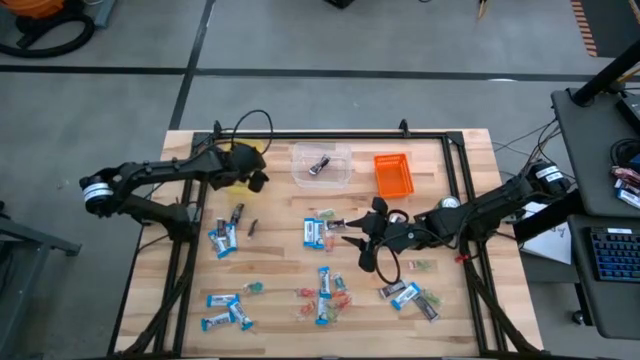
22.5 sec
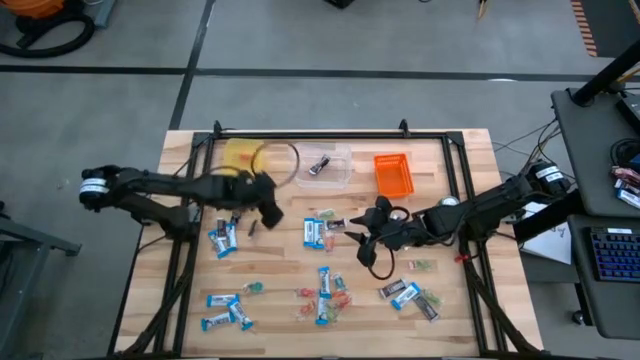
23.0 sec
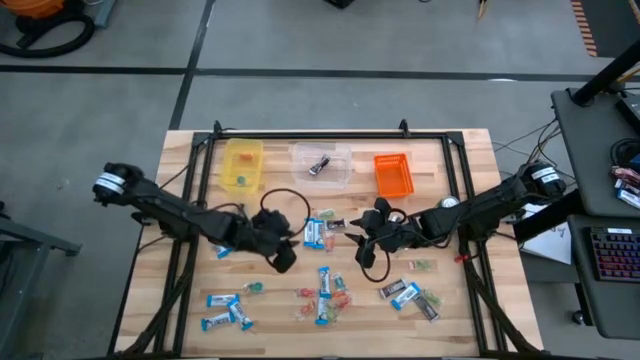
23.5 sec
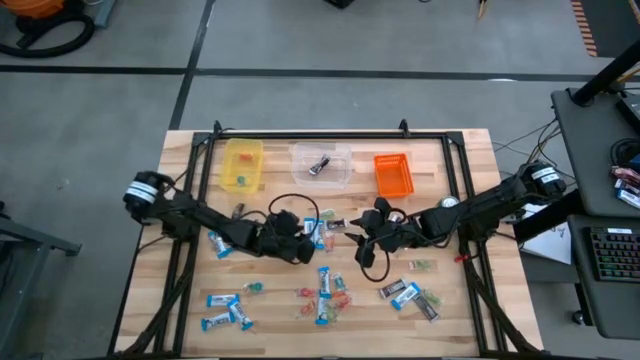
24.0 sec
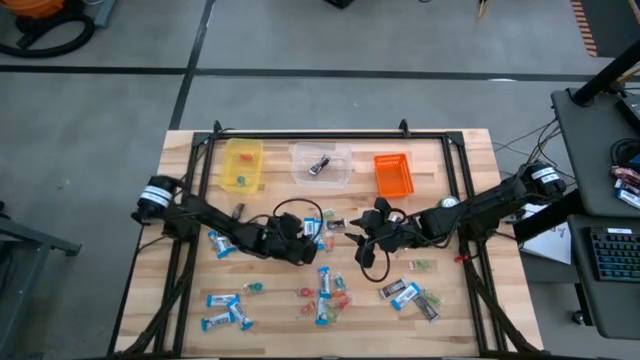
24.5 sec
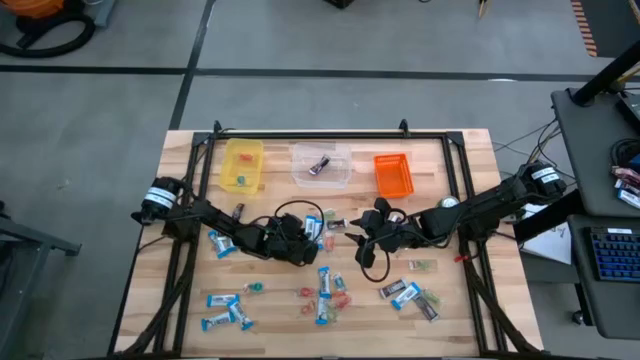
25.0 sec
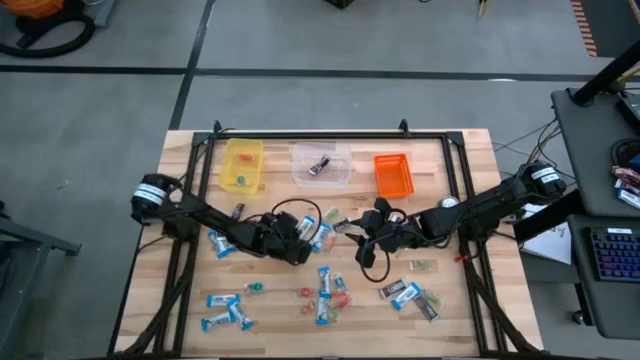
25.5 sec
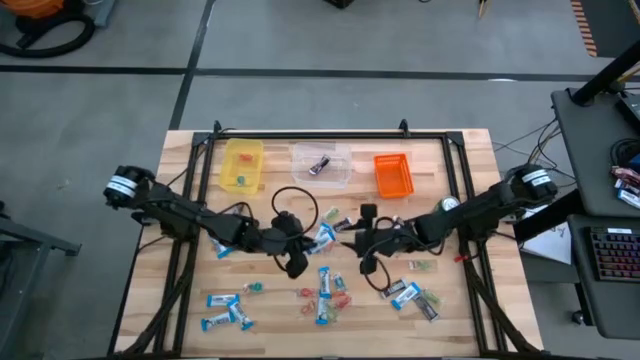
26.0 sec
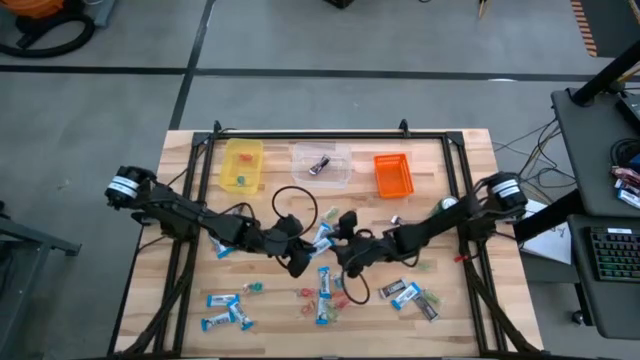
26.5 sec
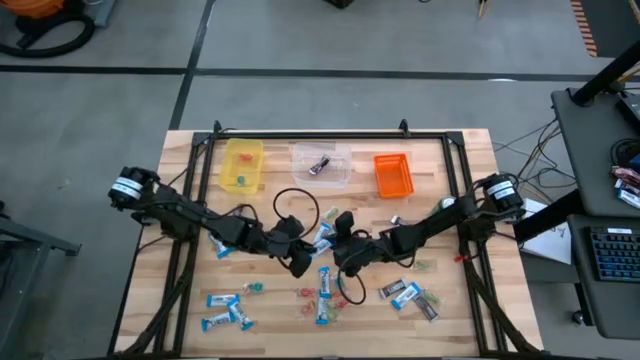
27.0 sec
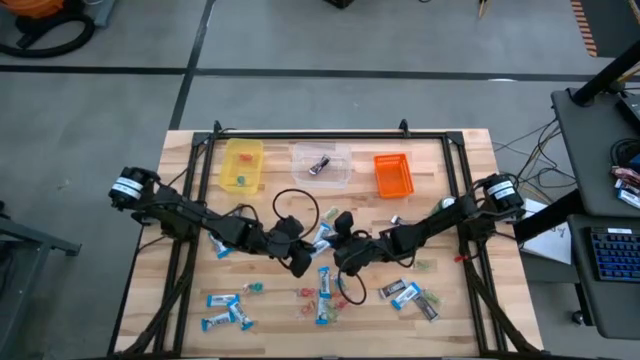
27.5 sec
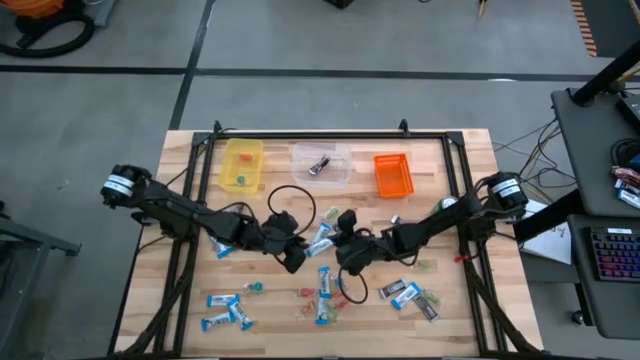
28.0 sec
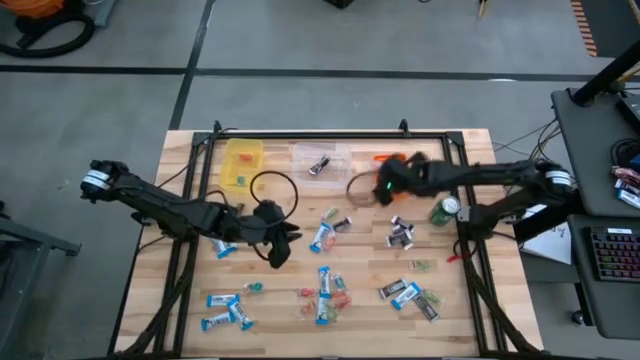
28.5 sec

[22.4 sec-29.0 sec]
Task: Organize candy in baskets
Put the white chocolate bar chocolate into the orange bin

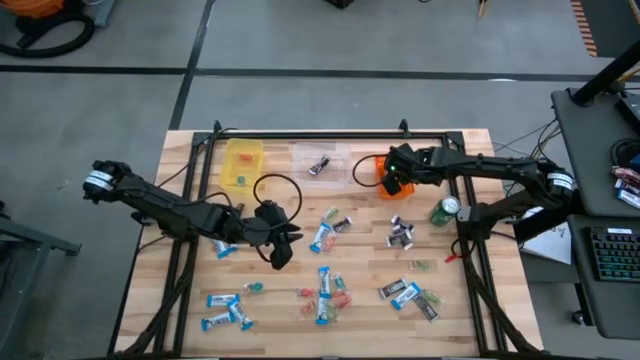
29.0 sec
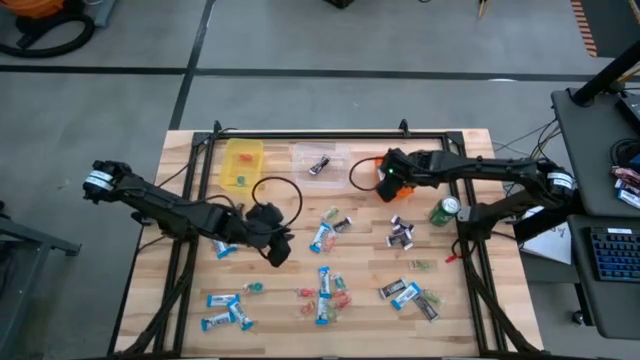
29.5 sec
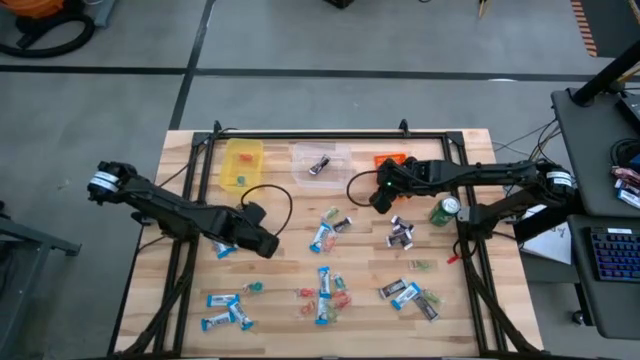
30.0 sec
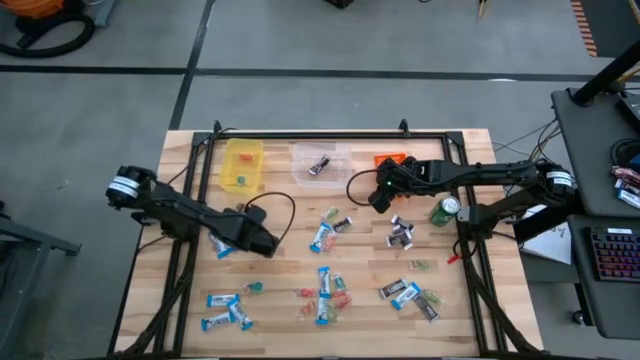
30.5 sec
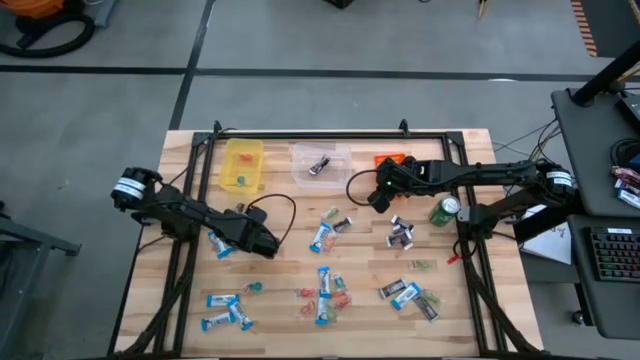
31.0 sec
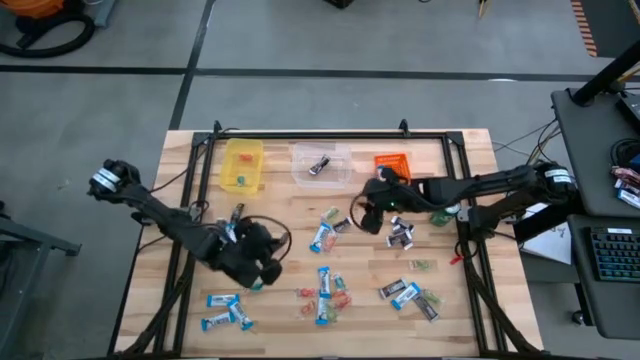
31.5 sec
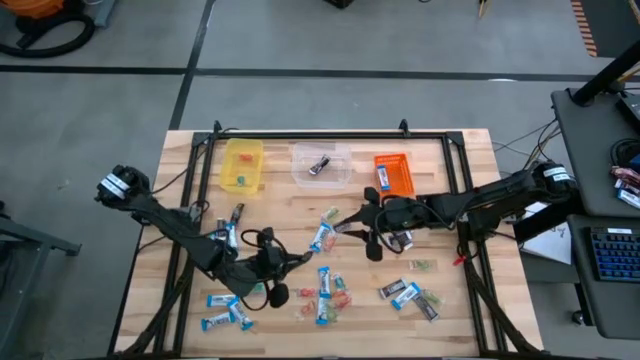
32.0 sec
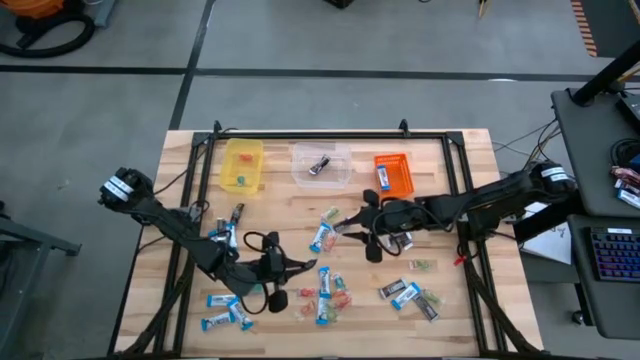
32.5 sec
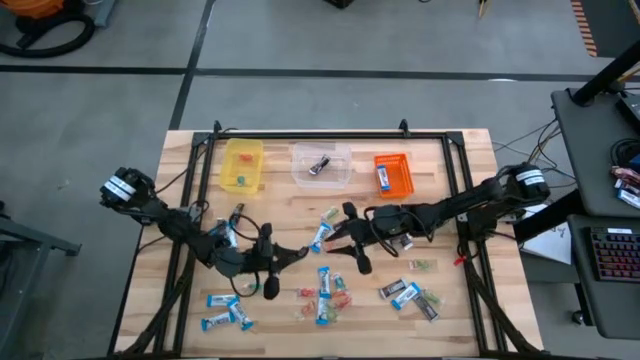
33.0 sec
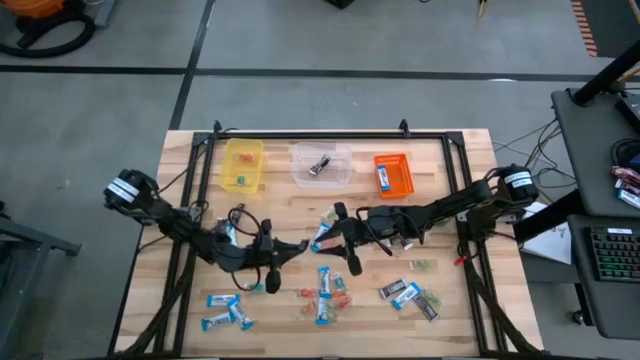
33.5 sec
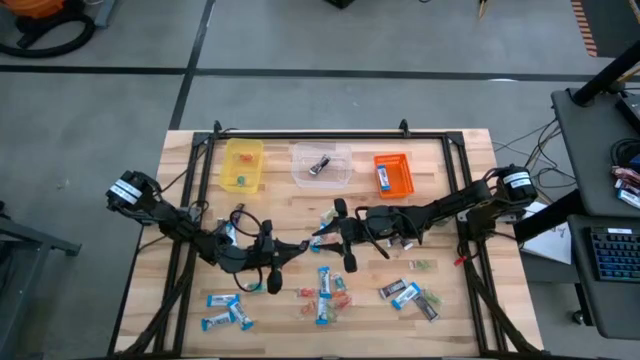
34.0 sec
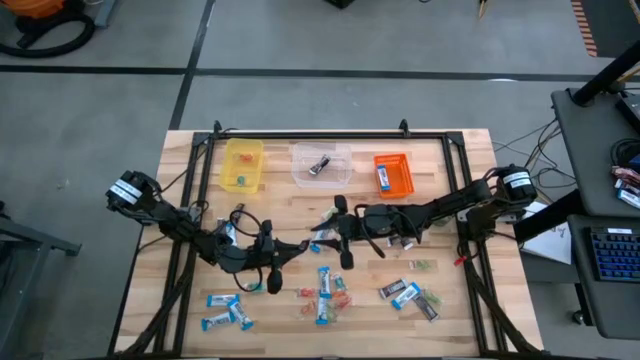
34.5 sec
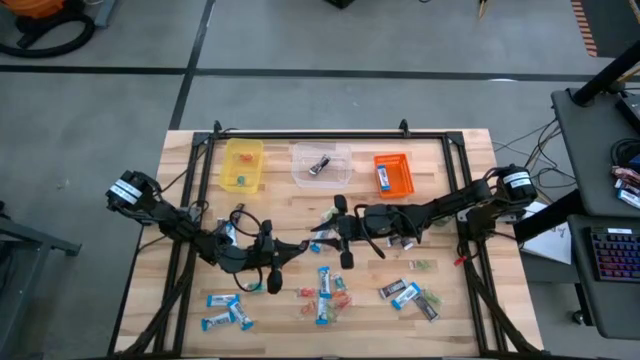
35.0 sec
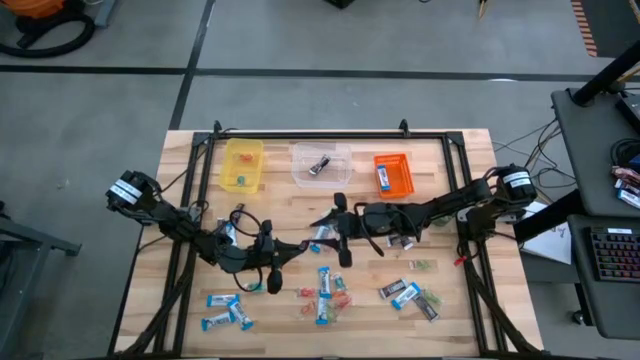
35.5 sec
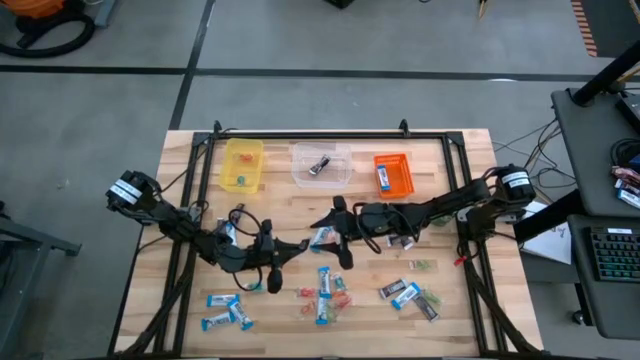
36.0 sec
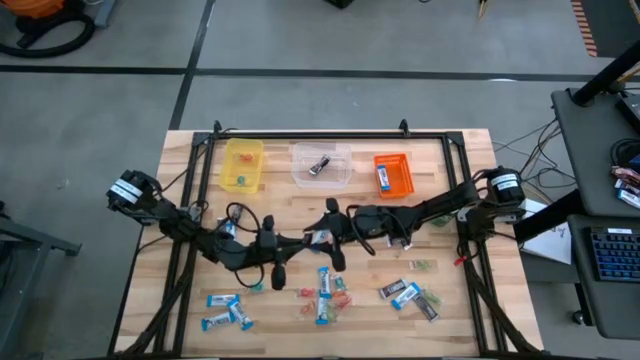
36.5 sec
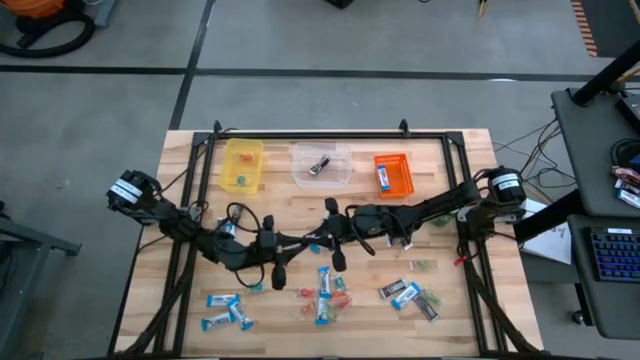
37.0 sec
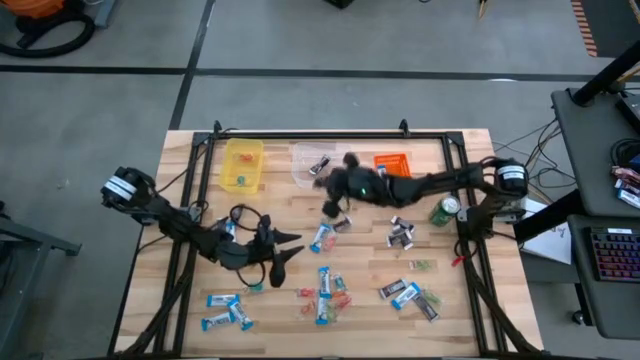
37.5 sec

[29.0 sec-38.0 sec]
Put the brown chocolate bar into the transparent bin

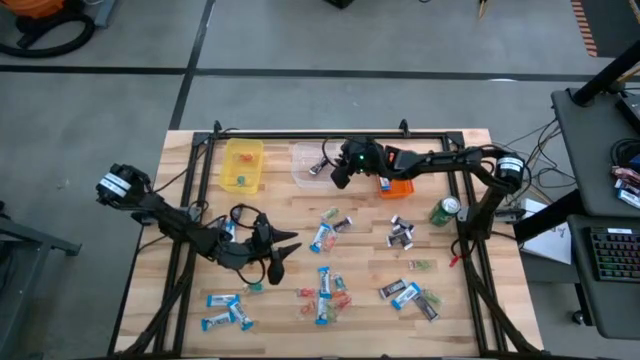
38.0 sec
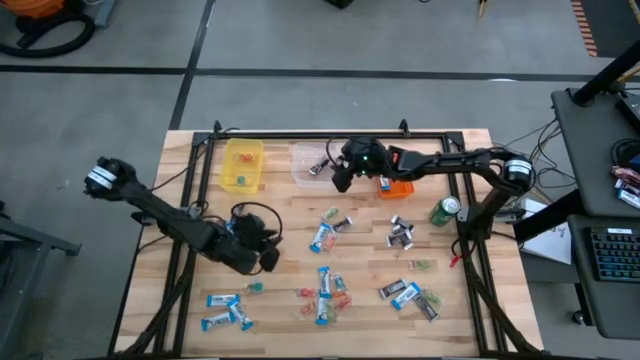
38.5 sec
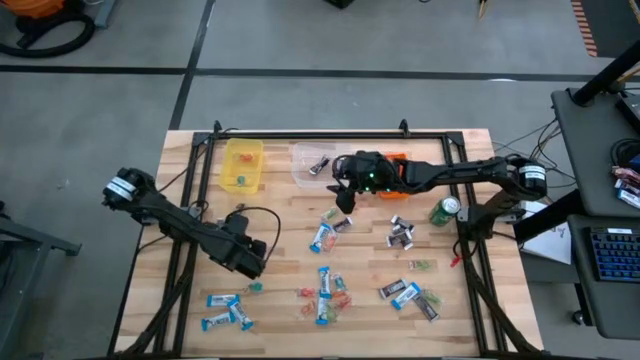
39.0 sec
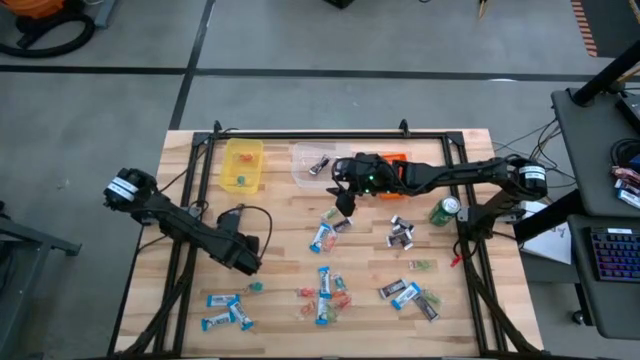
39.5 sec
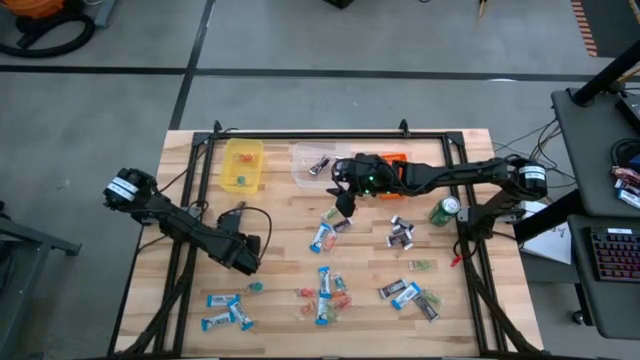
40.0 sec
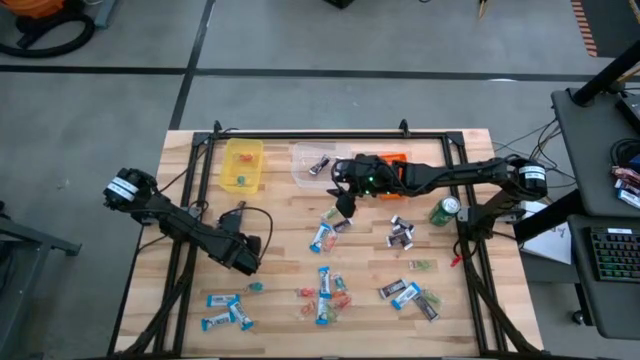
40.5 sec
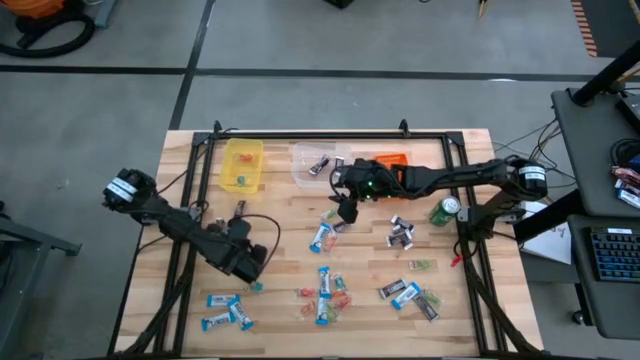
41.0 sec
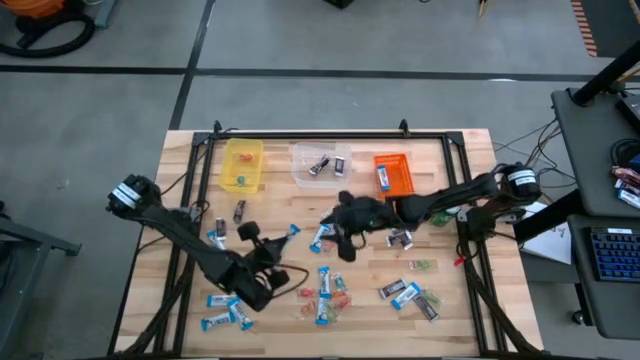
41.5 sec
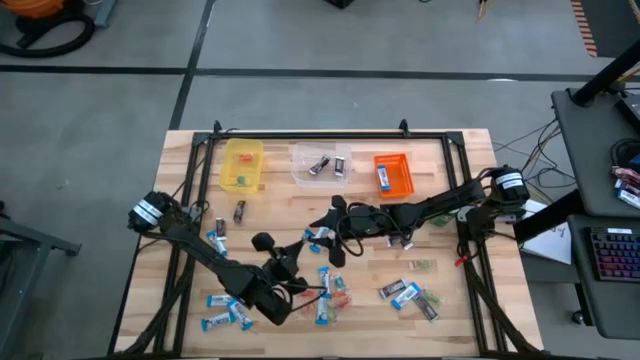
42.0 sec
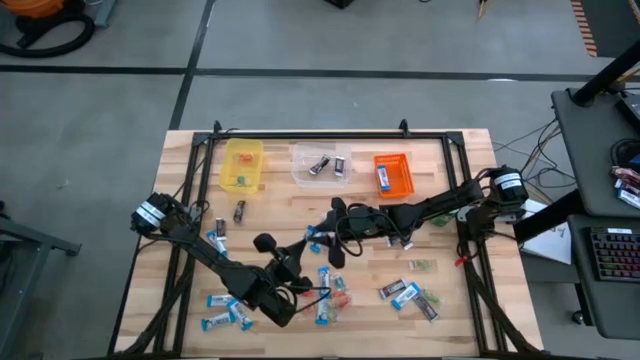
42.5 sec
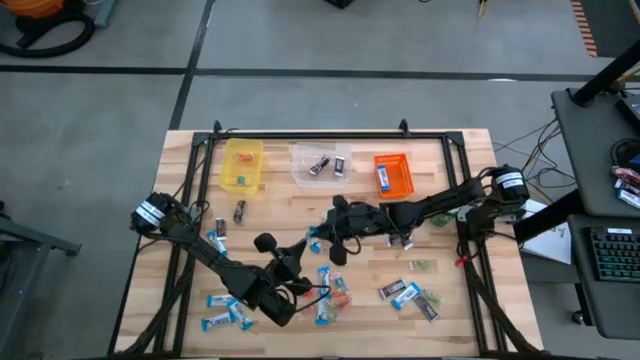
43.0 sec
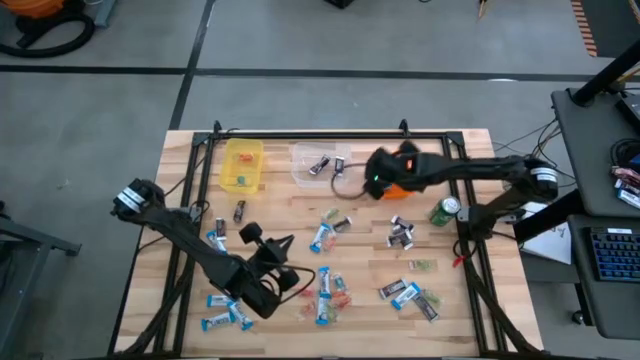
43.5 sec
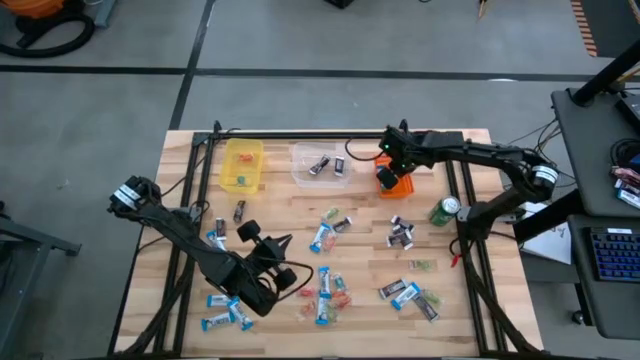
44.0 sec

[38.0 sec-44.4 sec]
Put the white chocolate bar chocolate into the orange bin
